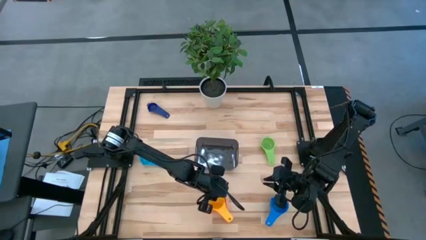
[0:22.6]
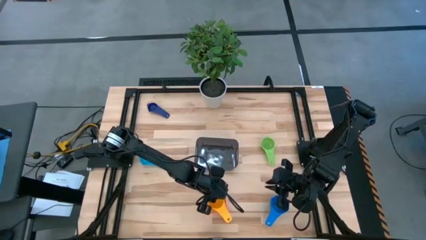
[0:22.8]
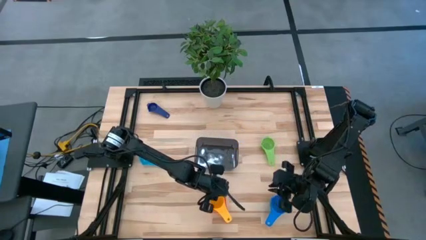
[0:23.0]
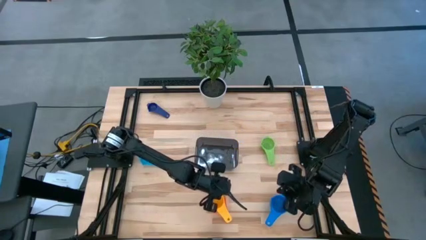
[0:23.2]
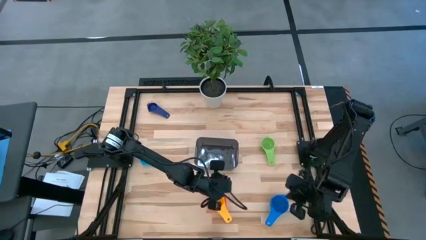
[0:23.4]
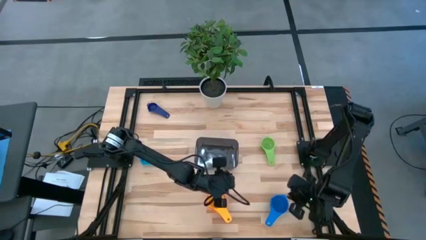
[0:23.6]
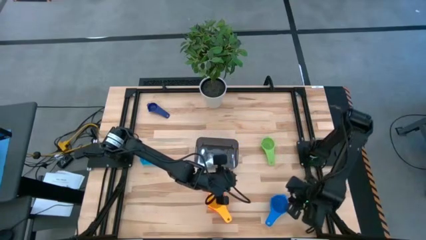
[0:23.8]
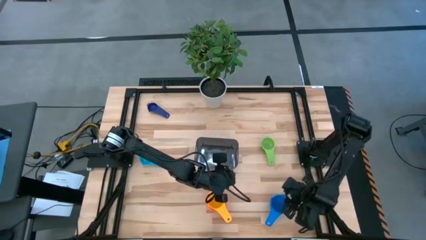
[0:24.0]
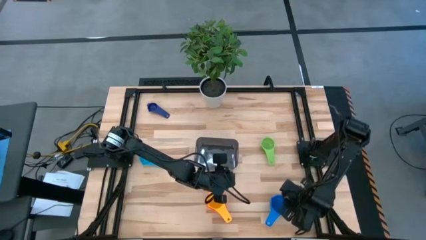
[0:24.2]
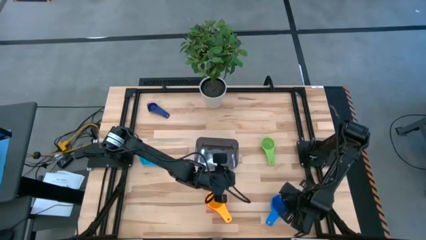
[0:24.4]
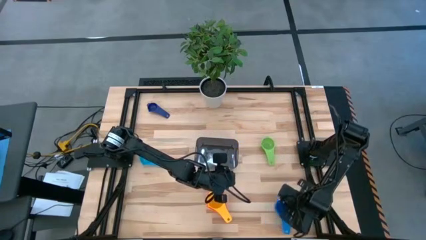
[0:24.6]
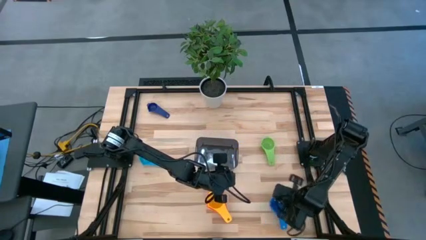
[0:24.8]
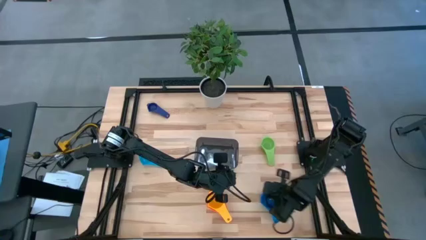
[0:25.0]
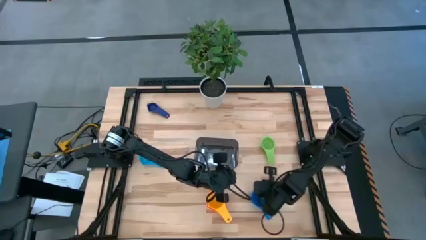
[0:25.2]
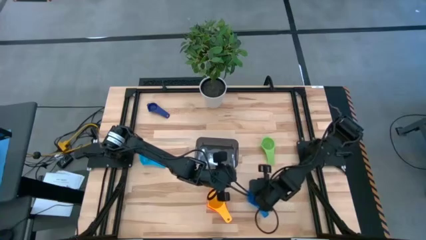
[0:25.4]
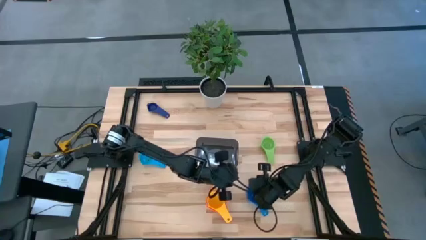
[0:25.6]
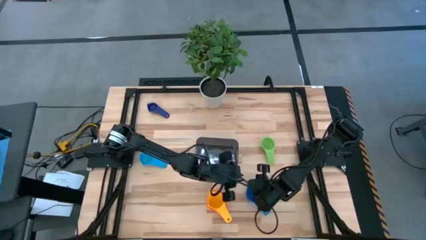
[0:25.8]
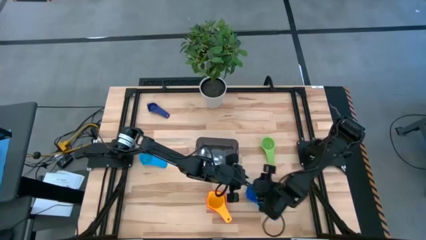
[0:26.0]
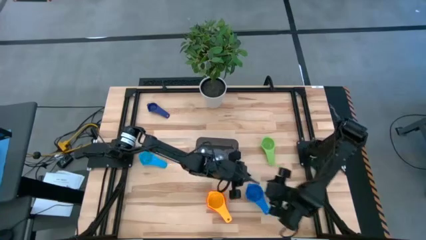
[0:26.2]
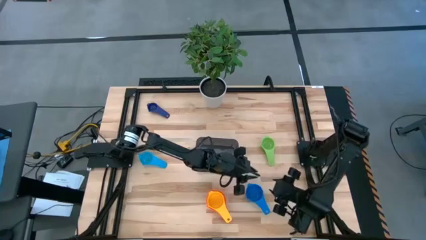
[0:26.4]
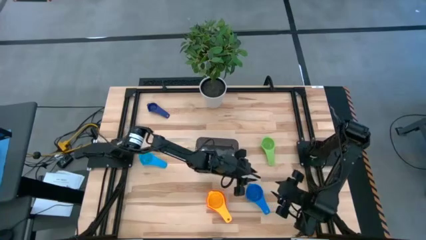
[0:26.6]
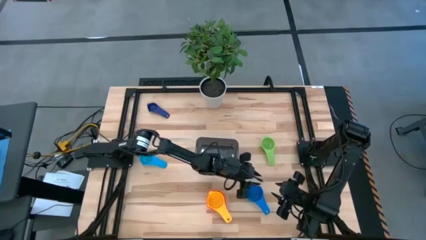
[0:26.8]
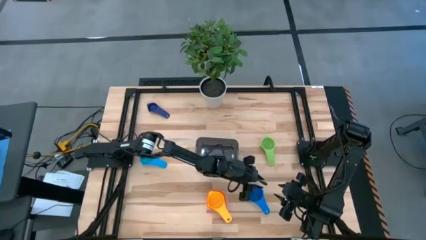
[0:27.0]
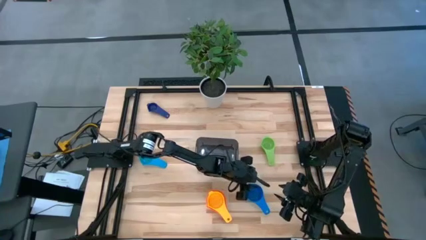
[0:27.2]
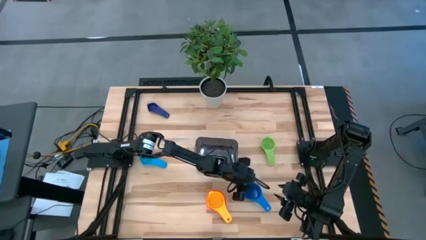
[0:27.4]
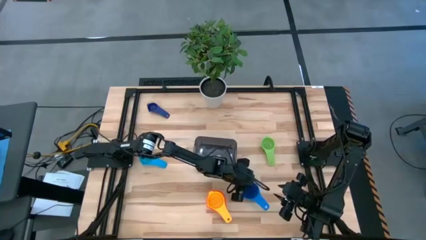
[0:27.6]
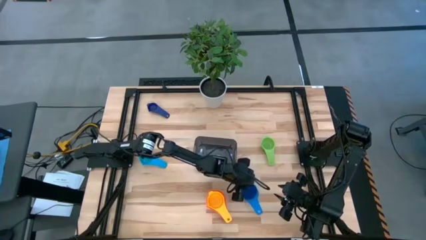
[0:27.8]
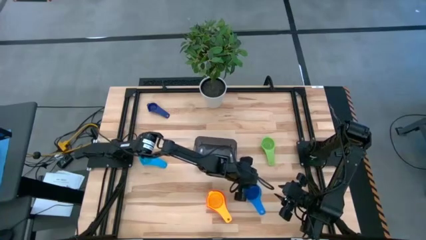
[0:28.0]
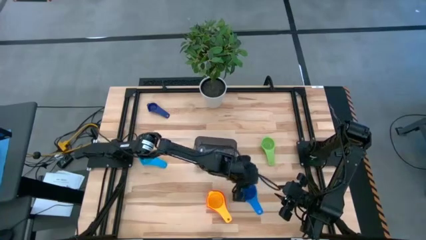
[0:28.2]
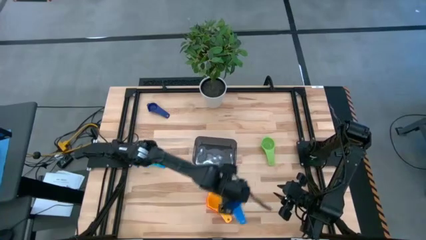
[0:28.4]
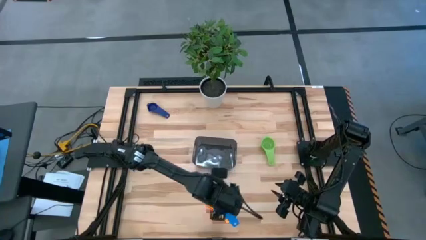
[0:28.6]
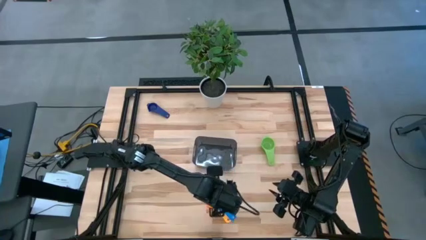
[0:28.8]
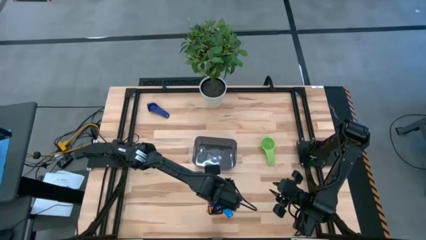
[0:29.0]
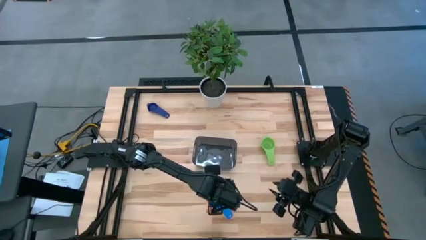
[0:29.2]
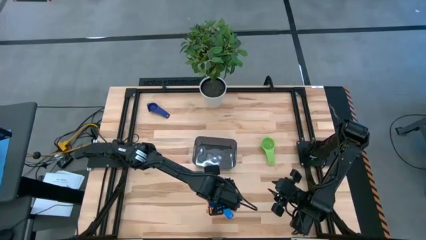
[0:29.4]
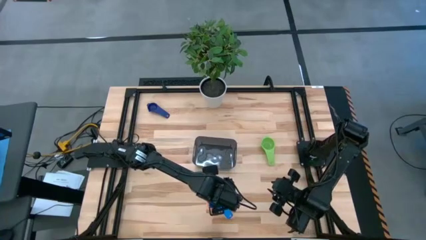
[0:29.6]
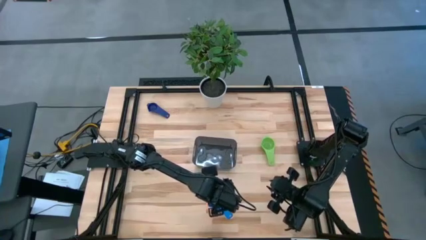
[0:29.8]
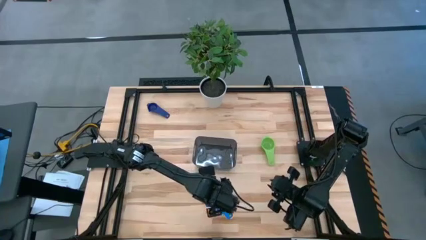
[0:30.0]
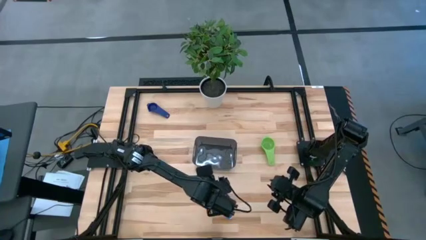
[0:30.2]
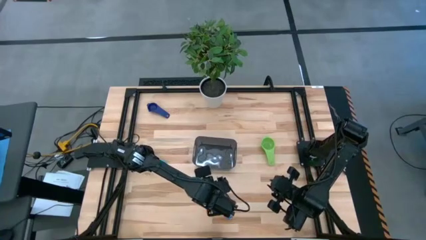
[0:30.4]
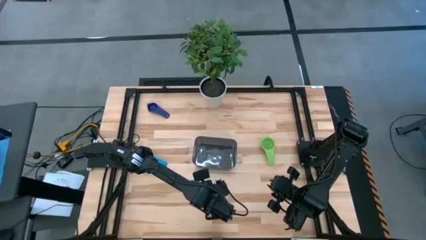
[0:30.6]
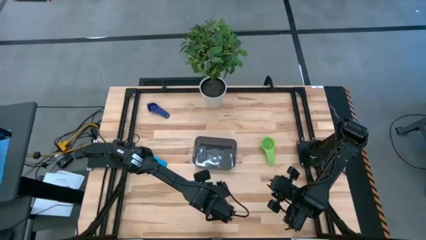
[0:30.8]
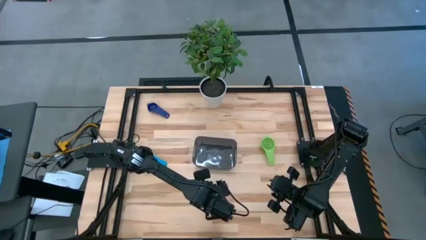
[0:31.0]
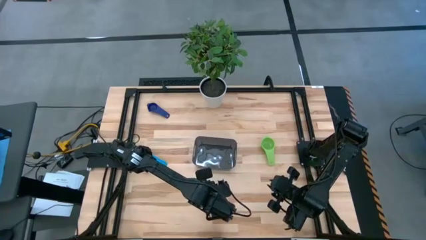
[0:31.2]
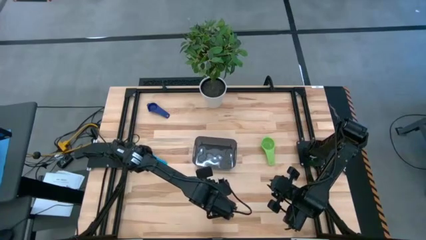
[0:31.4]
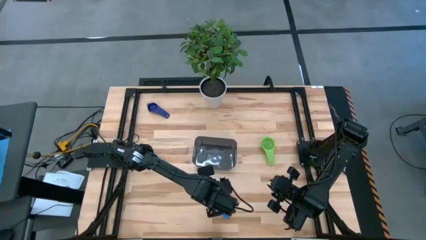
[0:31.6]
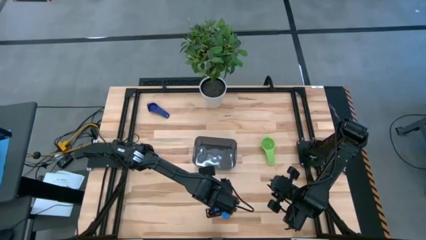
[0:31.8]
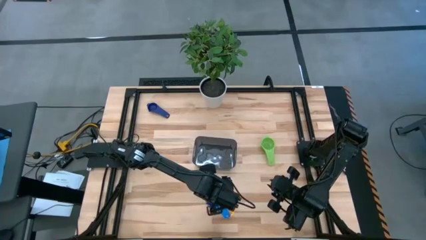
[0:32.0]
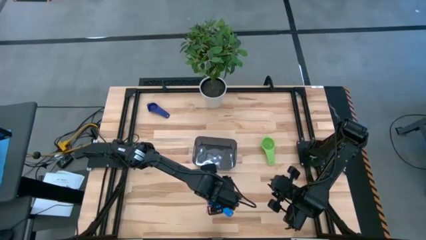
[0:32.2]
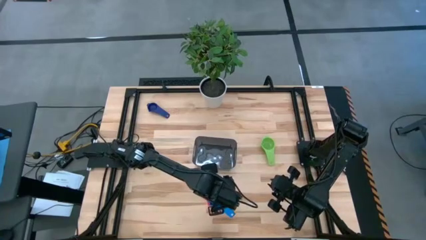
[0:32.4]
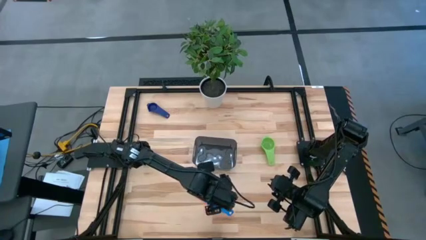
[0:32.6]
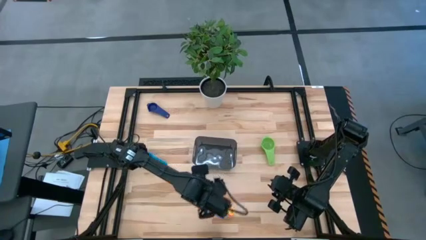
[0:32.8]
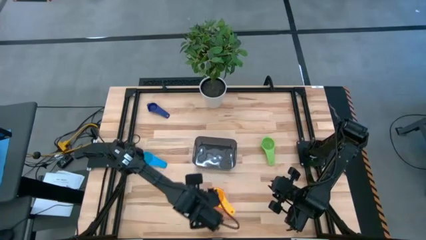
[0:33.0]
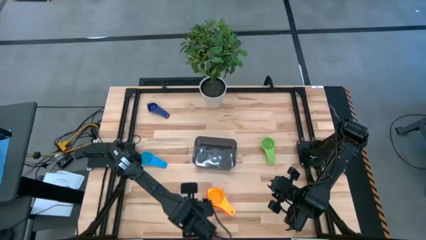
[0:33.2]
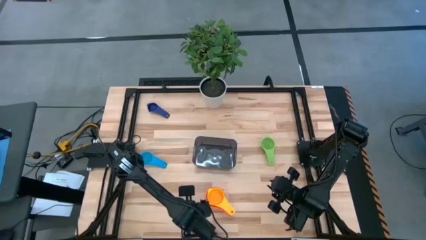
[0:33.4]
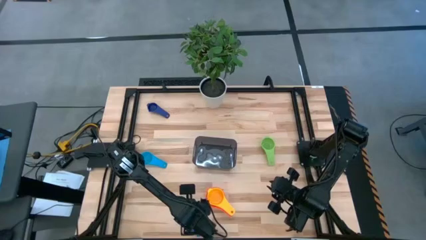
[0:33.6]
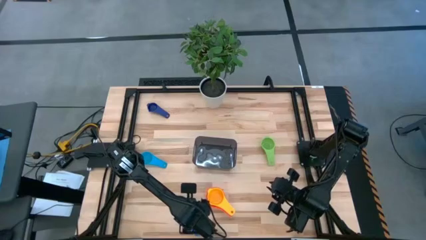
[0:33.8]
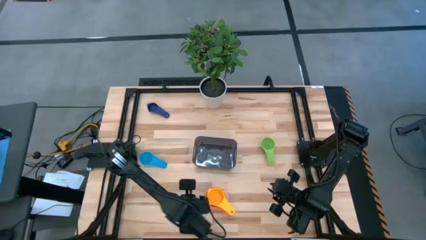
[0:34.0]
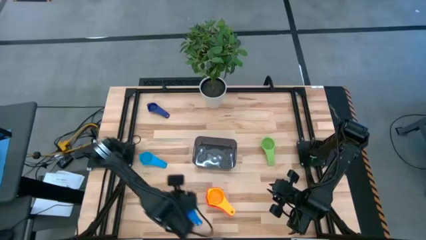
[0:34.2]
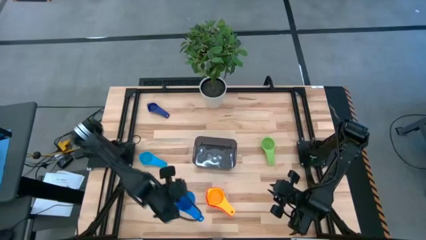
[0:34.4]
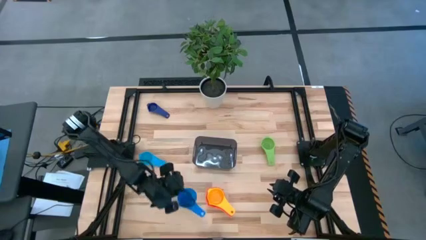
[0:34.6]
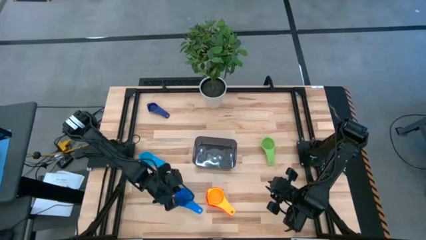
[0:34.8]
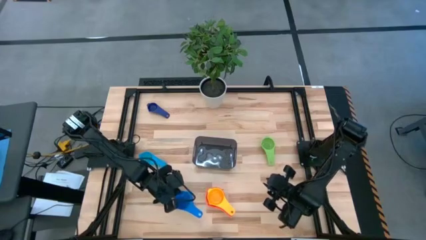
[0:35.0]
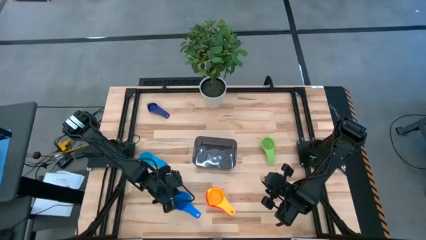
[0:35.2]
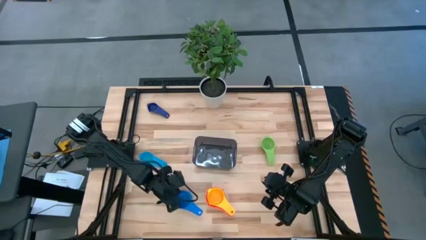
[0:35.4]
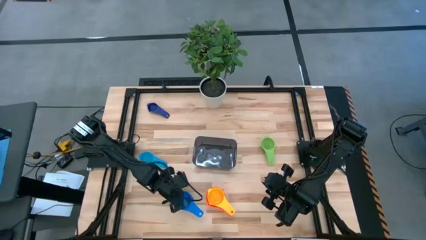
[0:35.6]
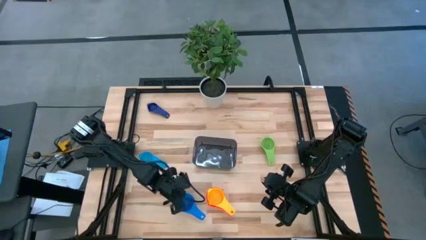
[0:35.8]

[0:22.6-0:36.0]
Task: Nest measuring cups in basket
Stack the blue measuring cup on the top of the yellow measuring cup

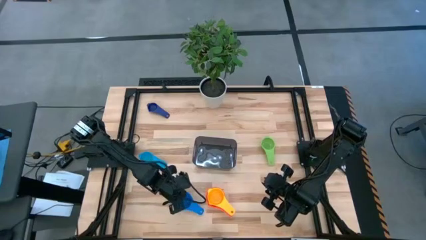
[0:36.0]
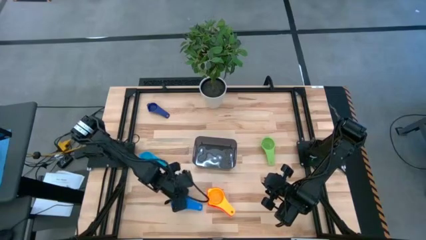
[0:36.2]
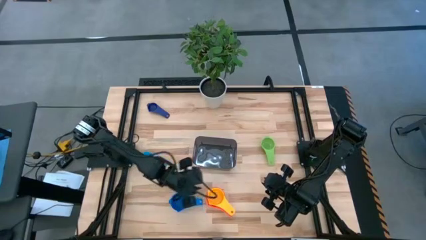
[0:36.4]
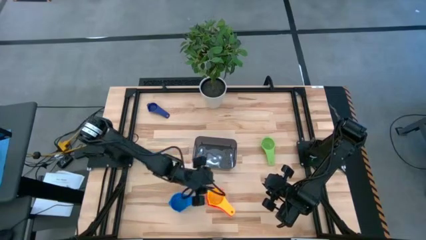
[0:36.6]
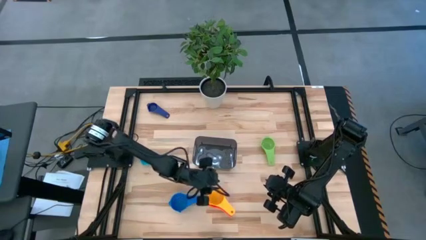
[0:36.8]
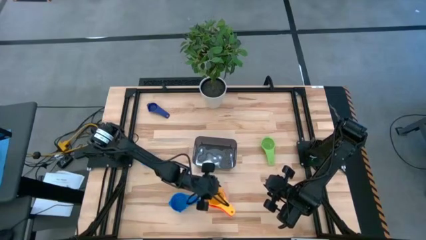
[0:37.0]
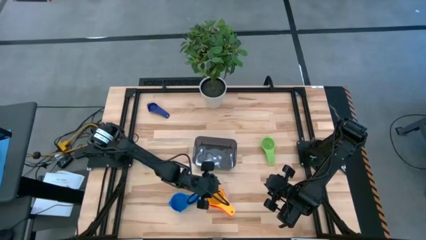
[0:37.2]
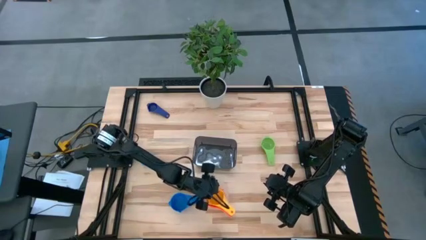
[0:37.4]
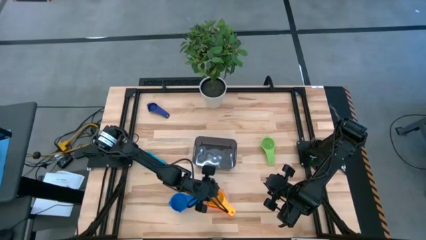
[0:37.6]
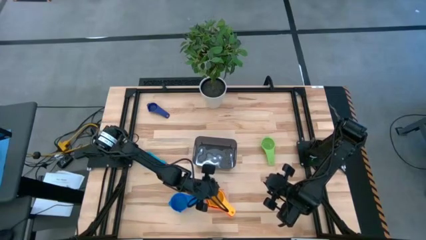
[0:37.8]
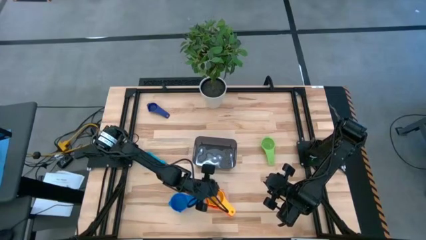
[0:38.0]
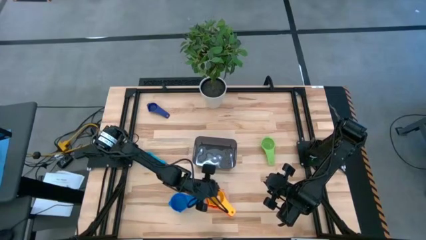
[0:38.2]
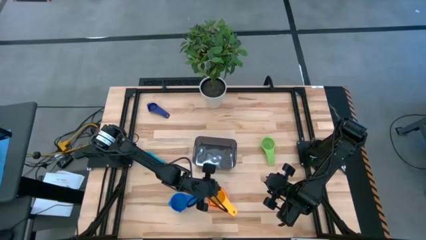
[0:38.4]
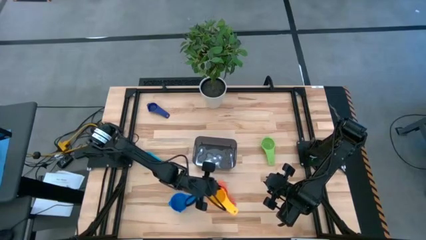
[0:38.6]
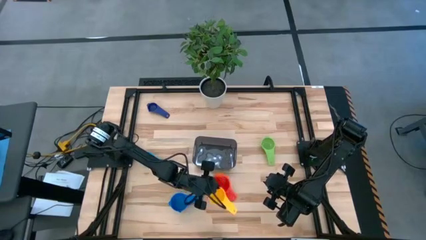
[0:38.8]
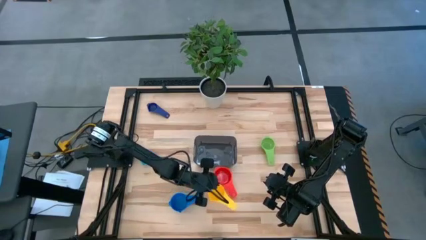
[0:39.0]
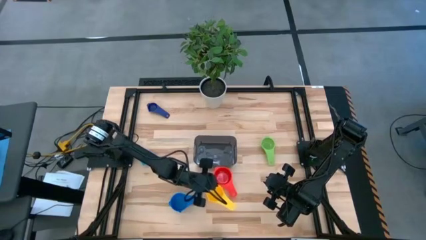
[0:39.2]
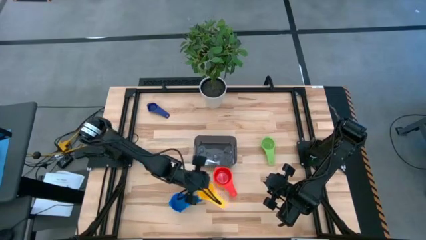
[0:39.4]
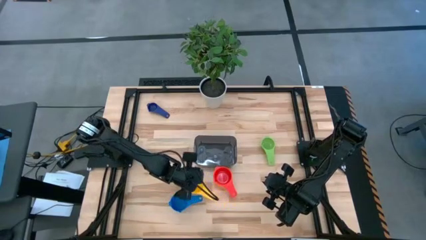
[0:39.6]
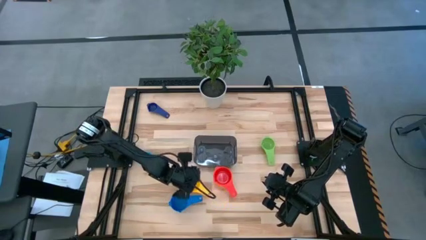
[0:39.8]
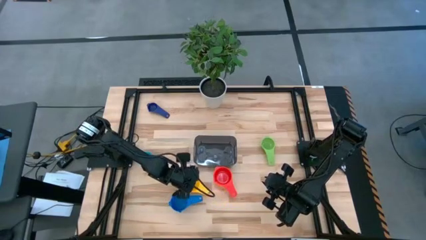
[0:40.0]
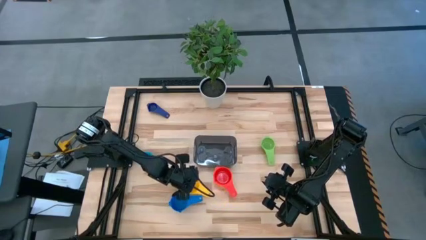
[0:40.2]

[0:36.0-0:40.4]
Remove the yellow measuring cup from the red measuring cup
